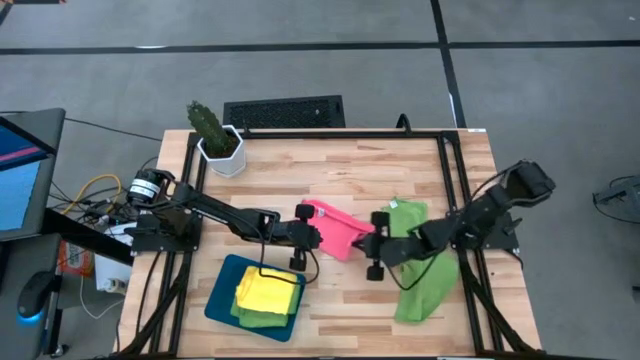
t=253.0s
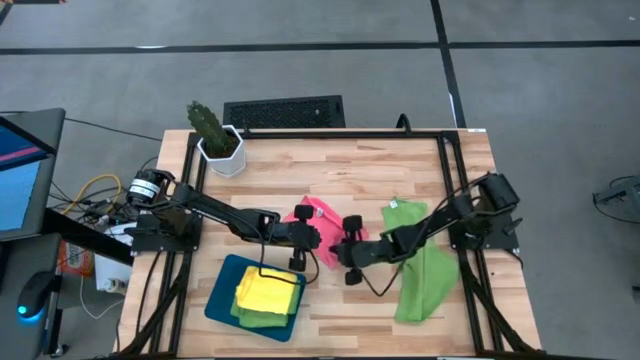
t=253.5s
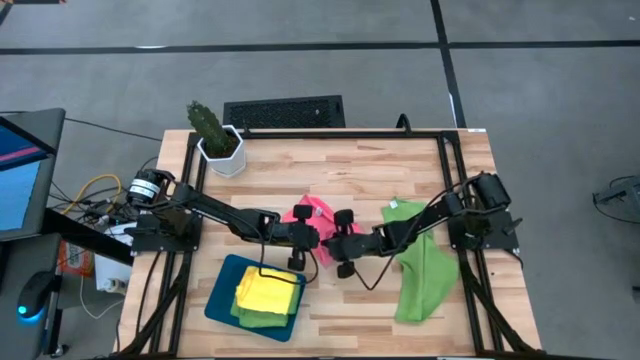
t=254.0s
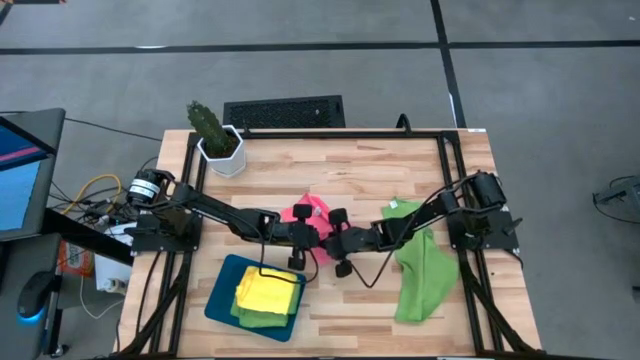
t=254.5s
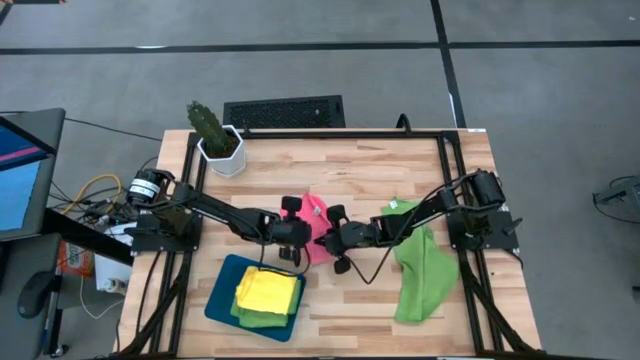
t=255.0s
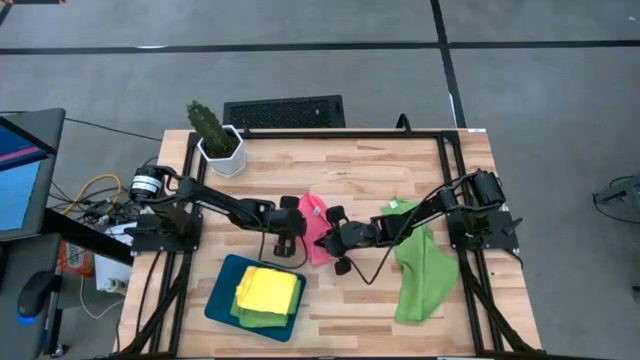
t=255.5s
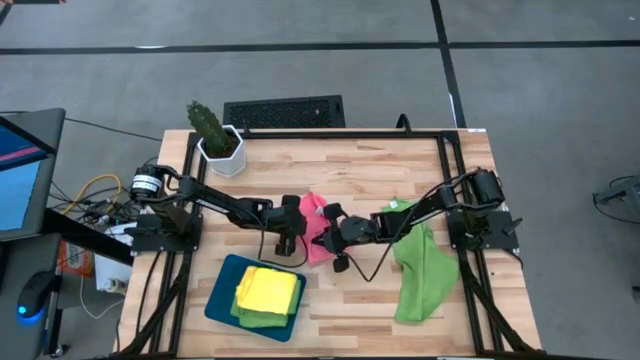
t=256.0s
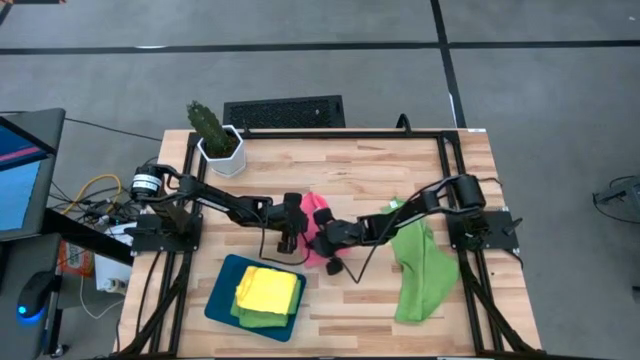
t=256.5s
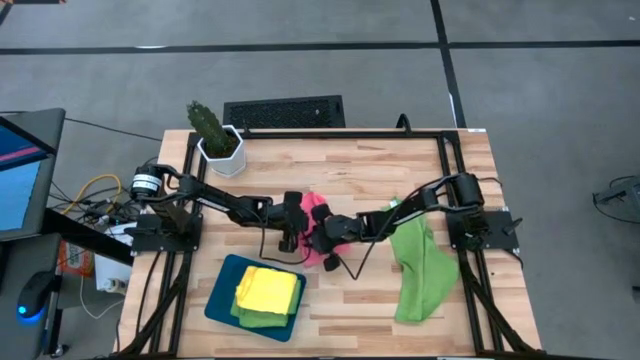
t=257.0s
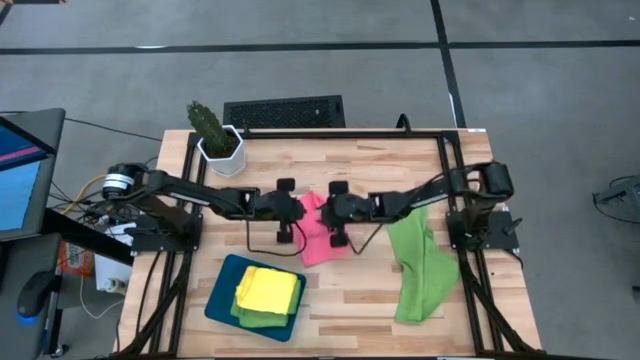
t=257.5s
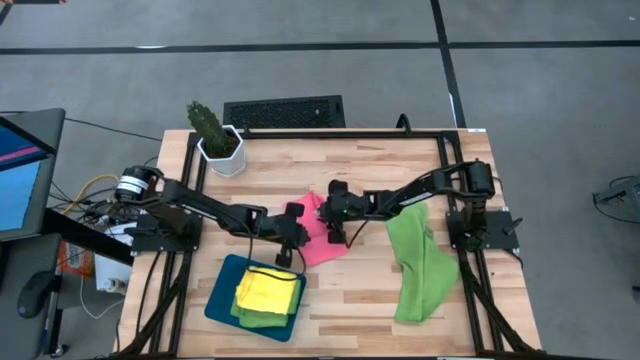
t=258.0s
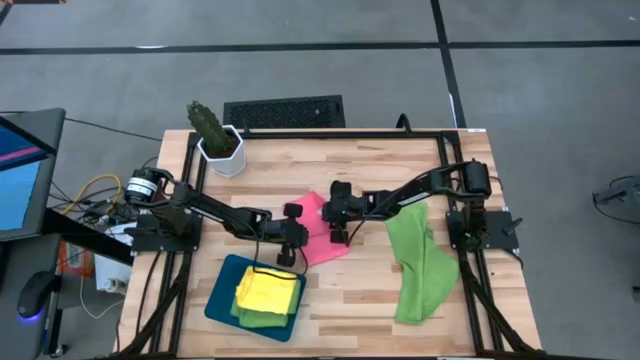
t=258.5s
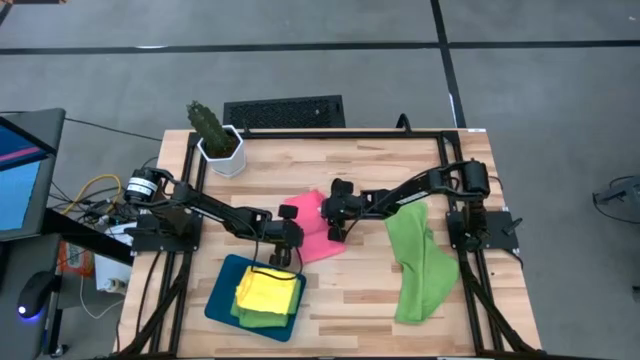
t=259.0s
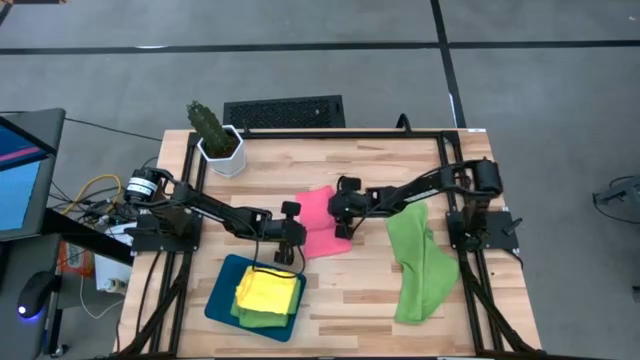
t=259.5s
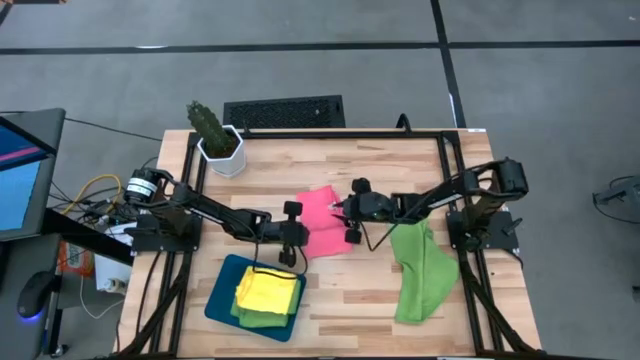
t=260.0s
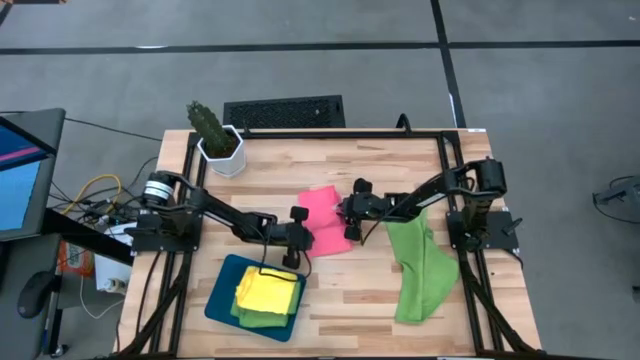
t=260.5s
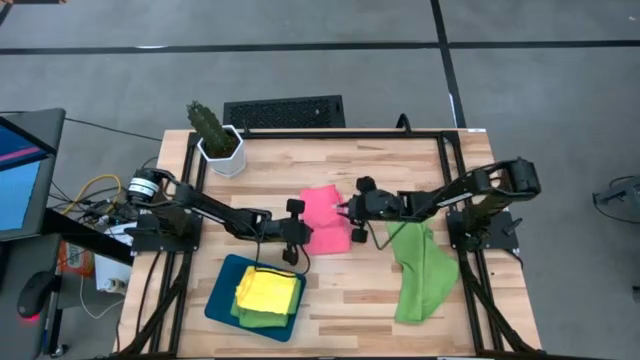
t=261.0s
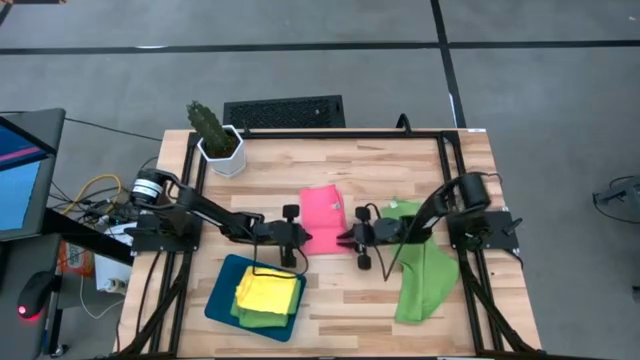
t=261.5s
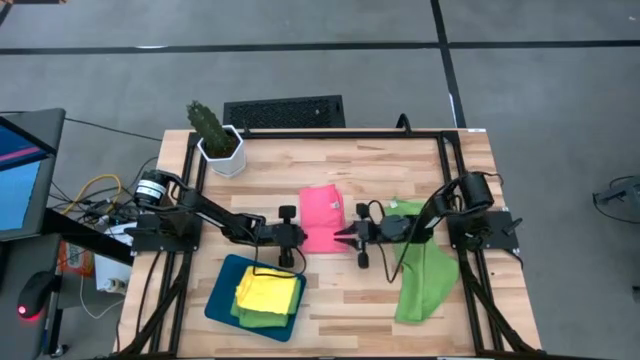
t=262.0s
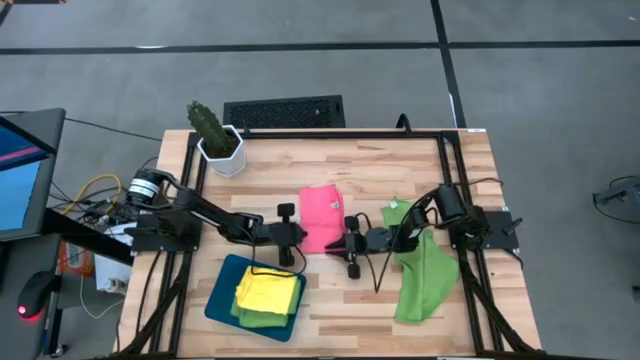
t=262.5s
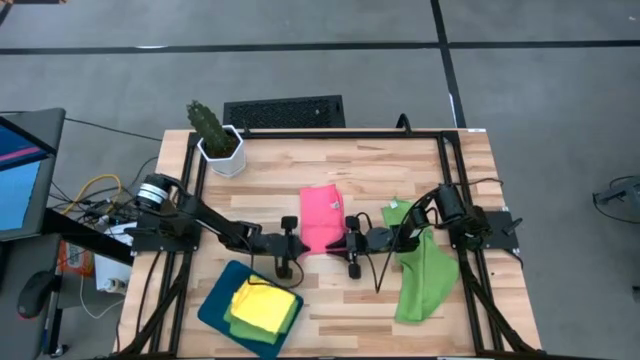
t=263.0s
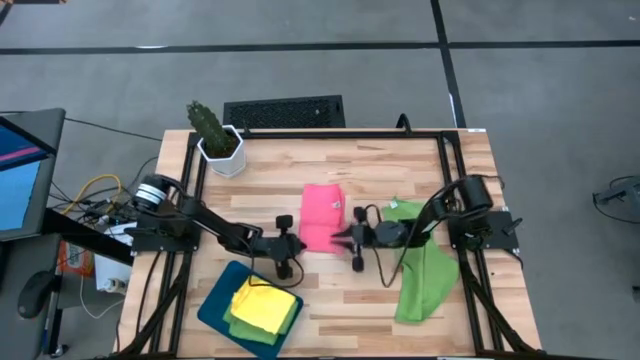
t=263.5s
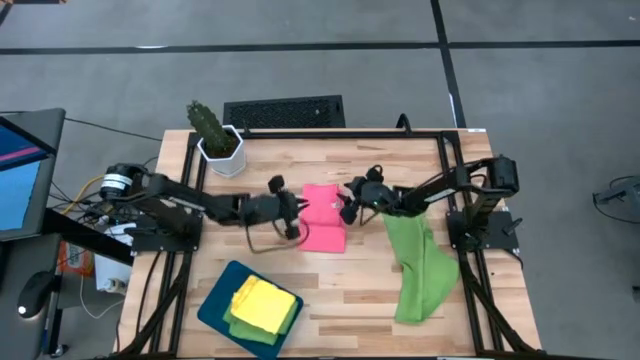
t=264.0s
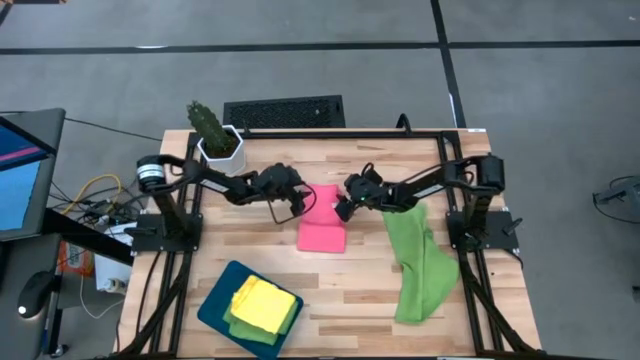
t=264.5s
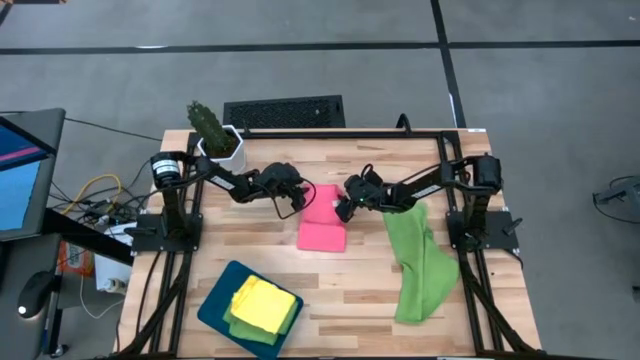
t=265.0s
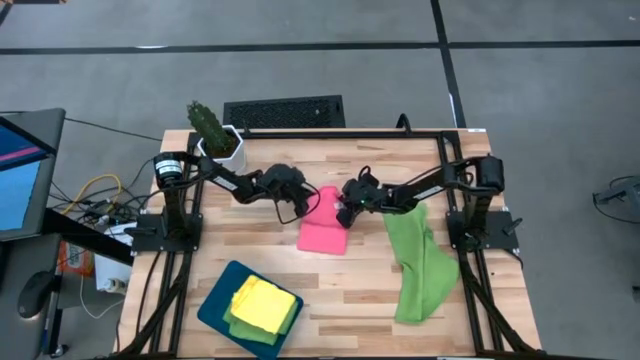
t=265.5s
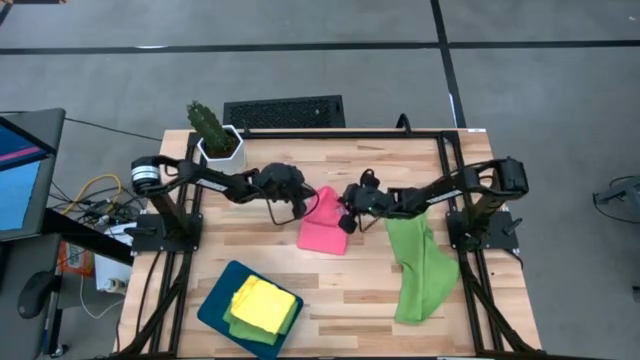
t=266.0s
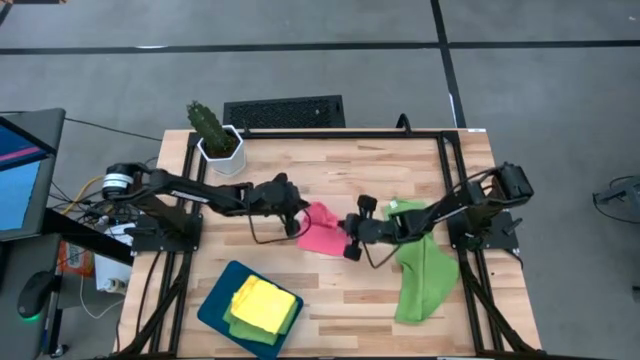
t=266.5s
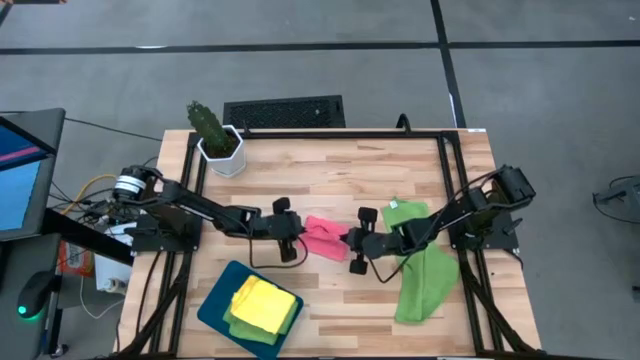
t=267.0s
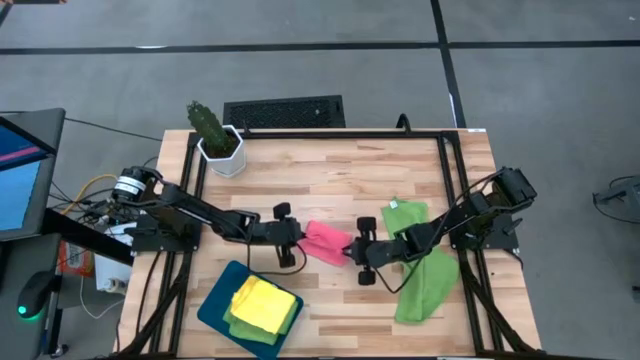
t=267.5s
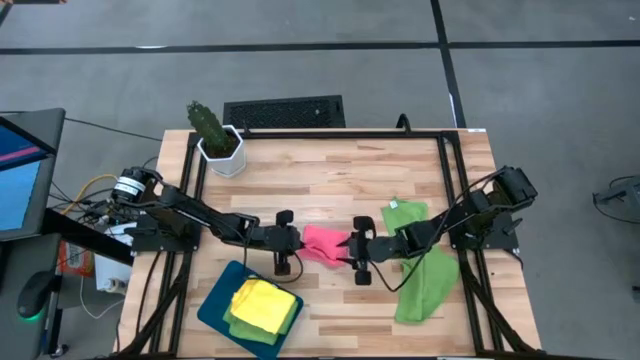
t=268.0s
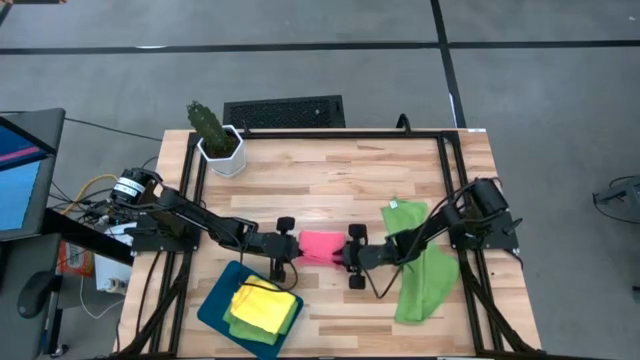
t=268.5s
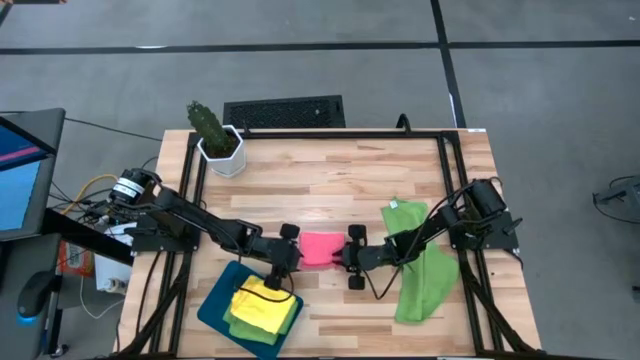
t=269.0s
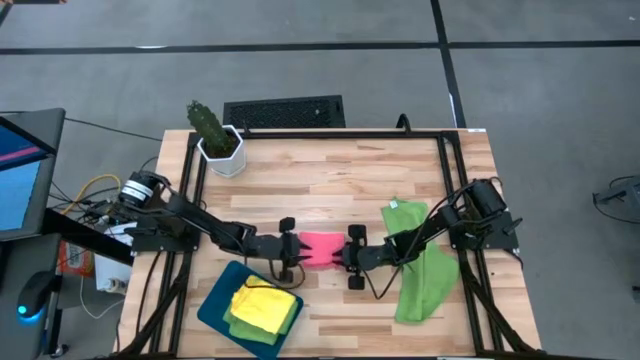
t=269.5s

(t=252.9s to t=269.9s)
Task: Fold microfiber towels
Fold the pink microfiber

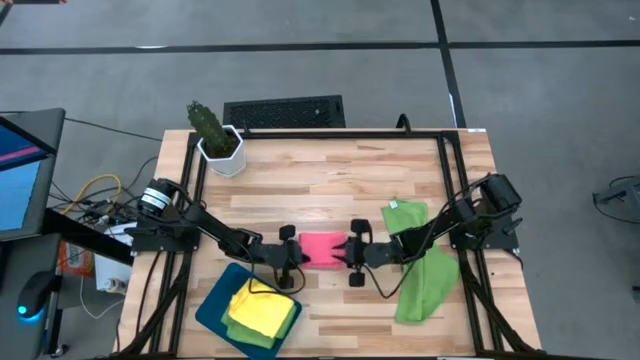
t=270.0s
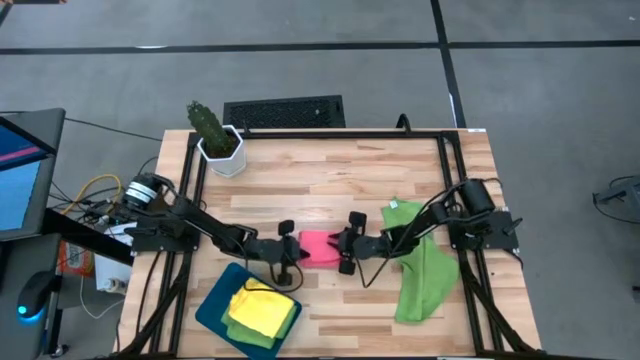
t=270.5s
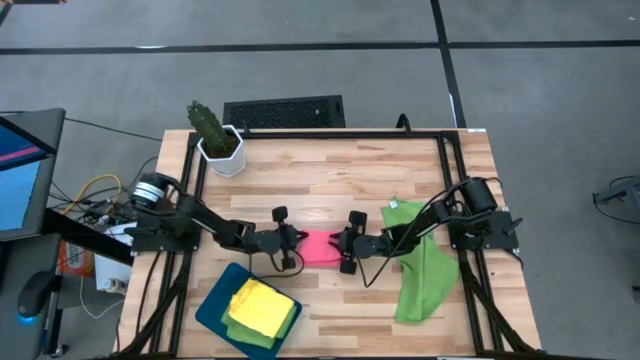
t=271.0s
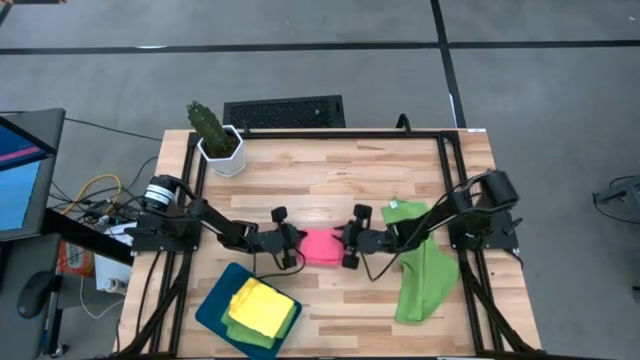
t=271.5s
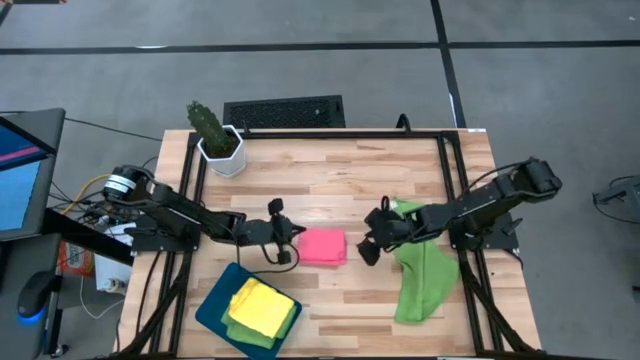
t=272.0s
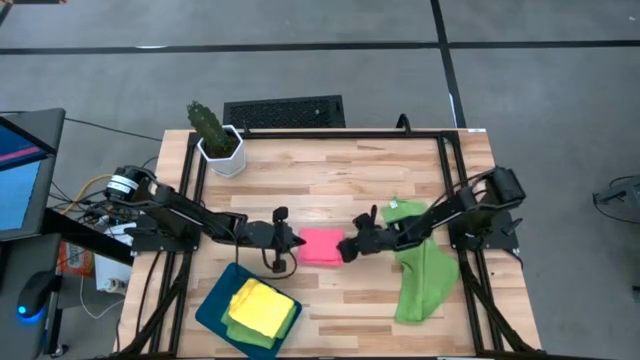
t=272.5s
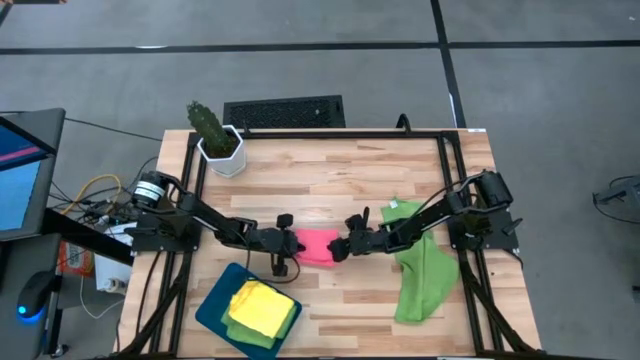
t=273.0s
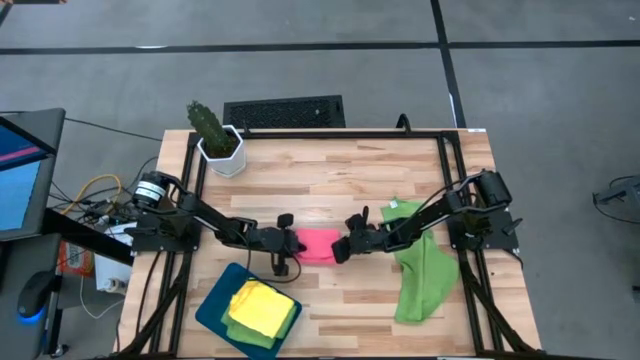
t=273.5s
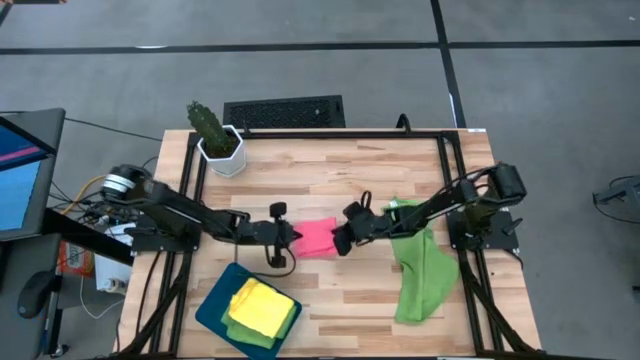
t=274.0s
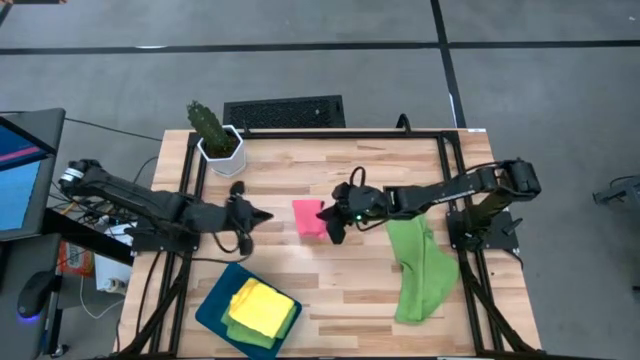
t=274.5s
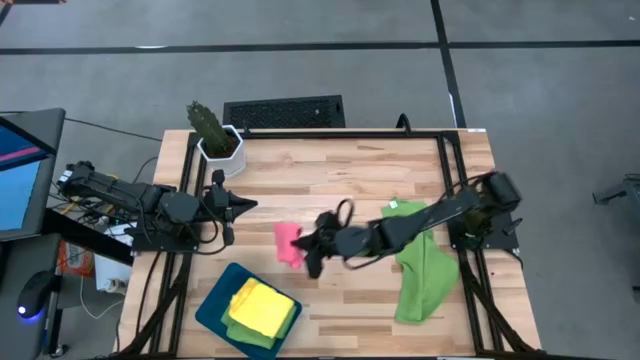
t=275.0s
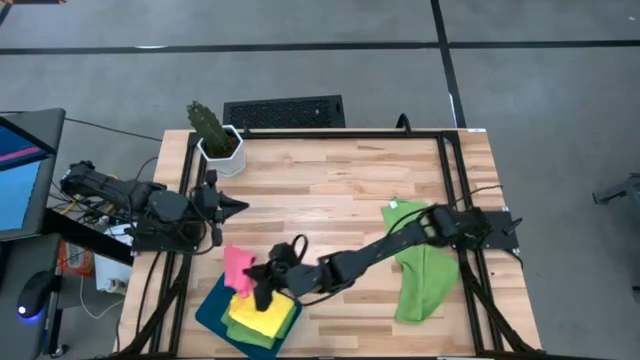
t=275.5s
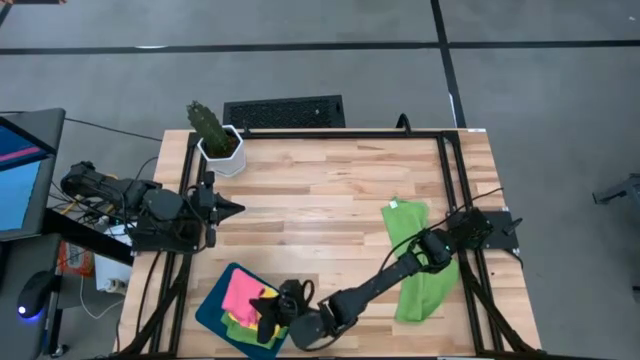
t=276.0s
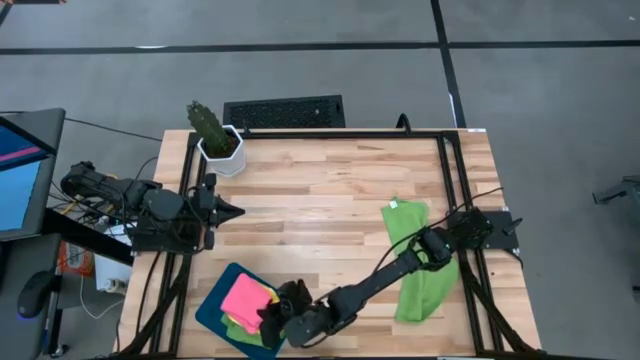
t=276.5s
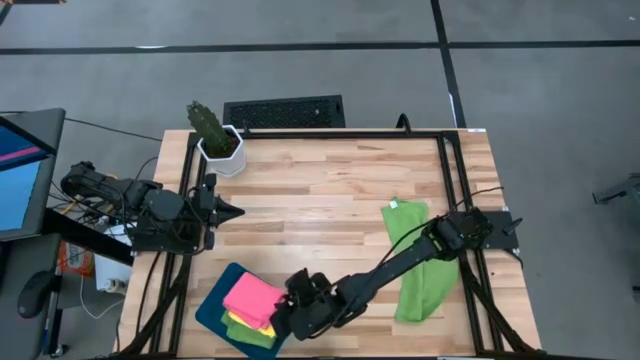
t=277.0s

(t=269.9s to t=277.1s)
Stack the folded pink microfiber on the yellow microfiber cloth in the blue bin
